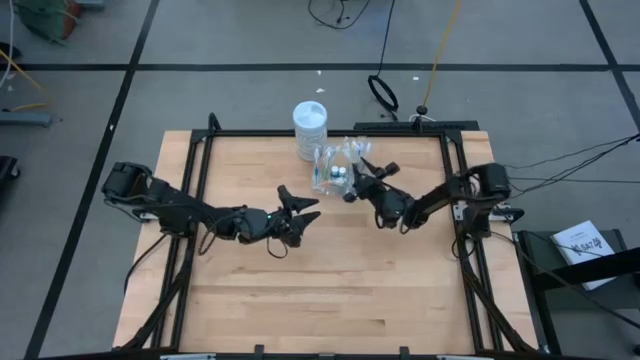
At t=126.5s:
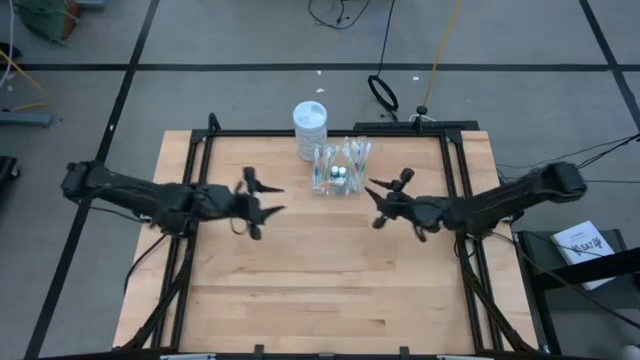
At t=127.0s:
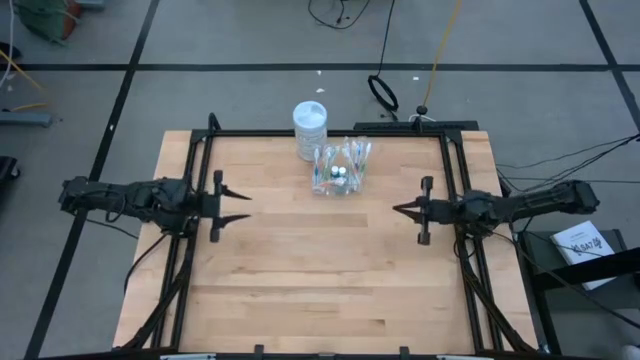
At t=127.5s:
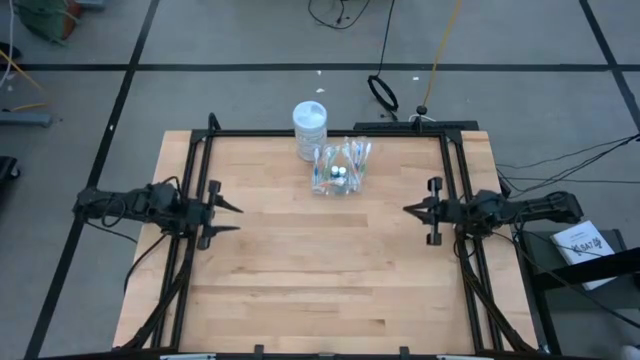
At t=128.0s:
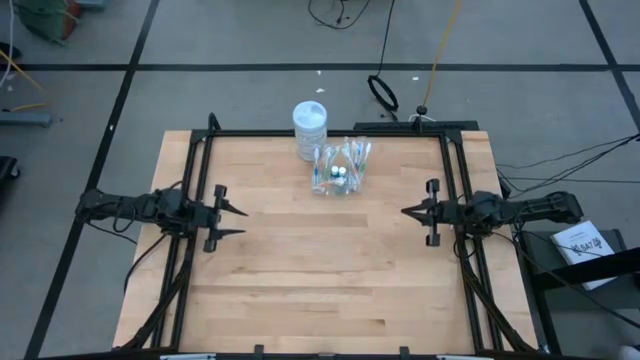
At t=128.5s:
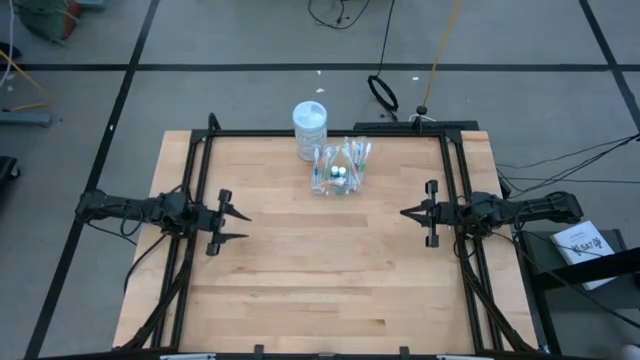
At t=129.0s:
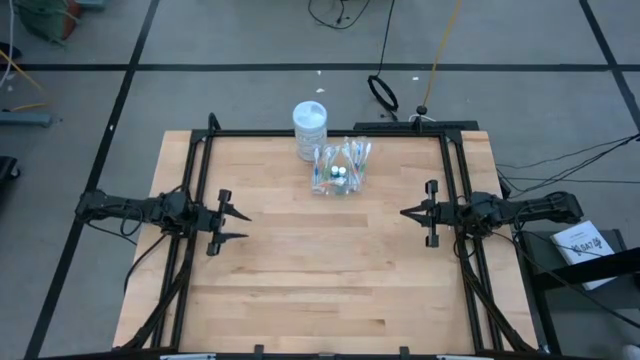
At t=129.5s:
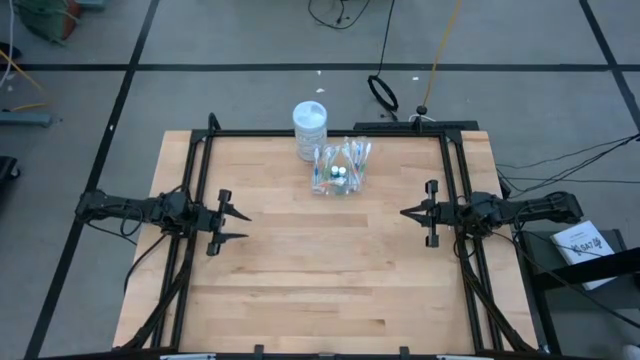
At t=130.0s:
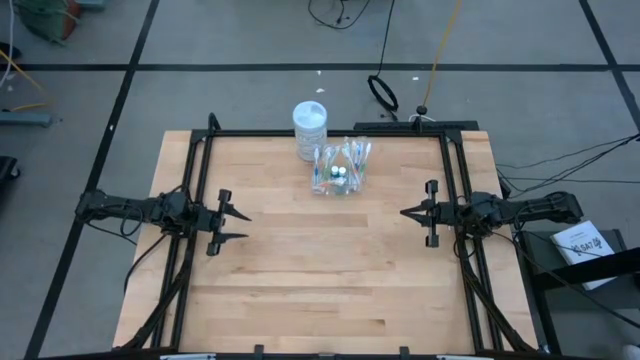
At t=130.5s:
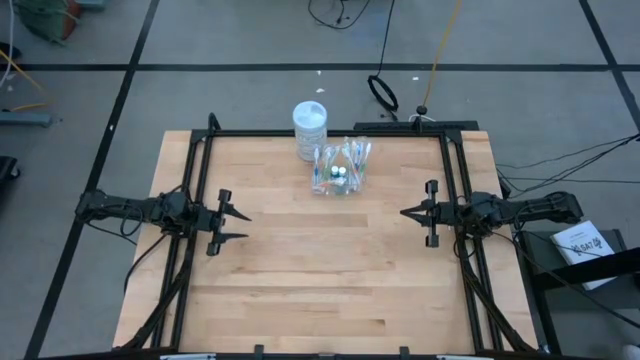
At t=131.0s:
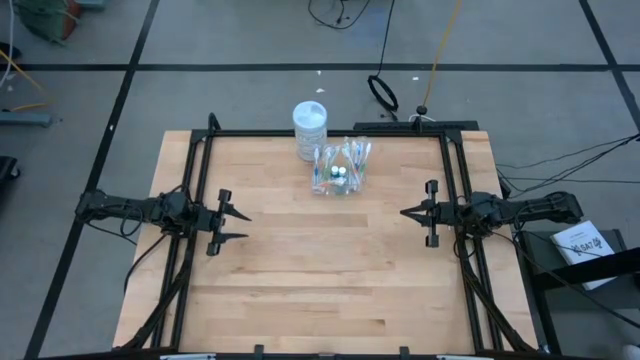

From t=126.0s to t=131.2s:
Task: Pick & Place toothbrushing station
Return to Home Position

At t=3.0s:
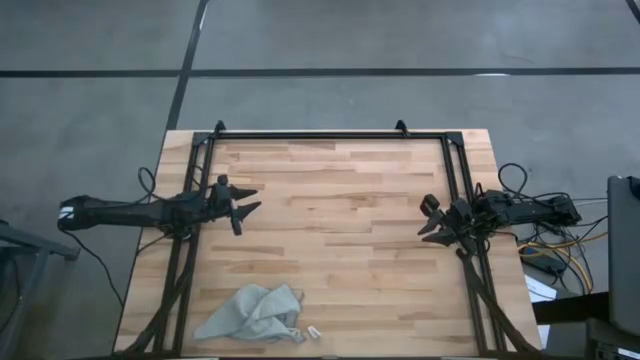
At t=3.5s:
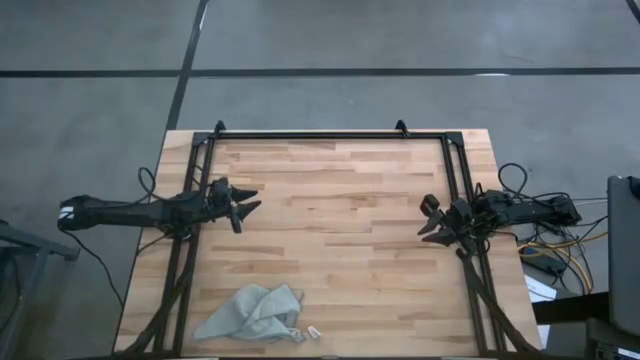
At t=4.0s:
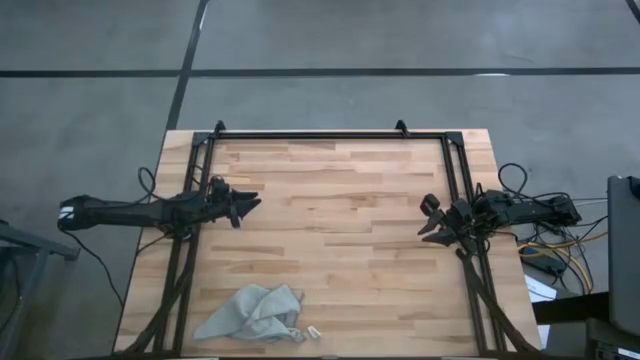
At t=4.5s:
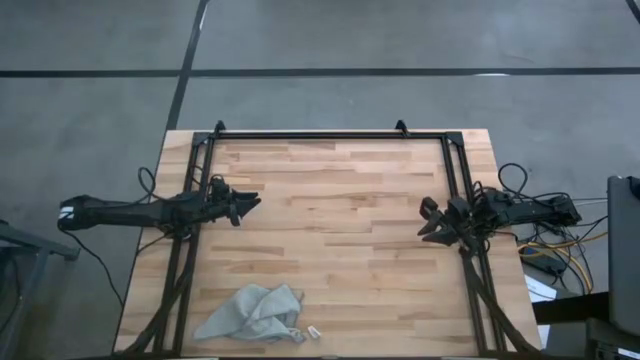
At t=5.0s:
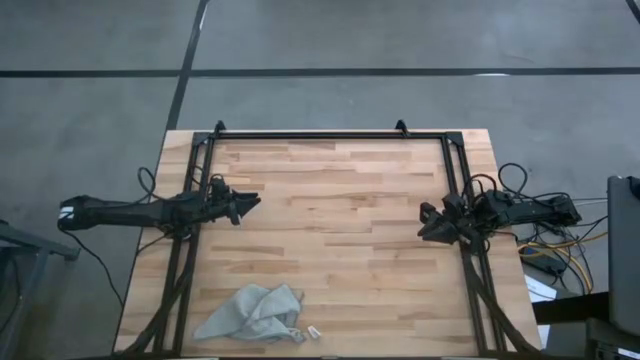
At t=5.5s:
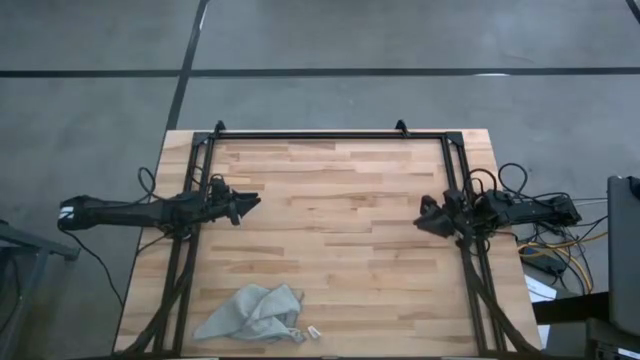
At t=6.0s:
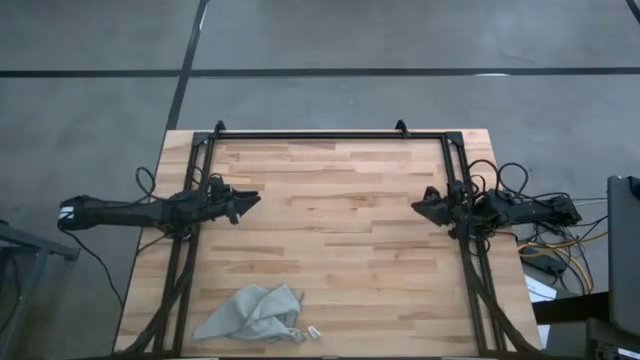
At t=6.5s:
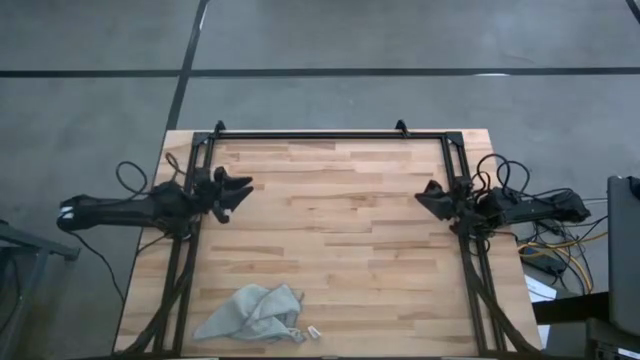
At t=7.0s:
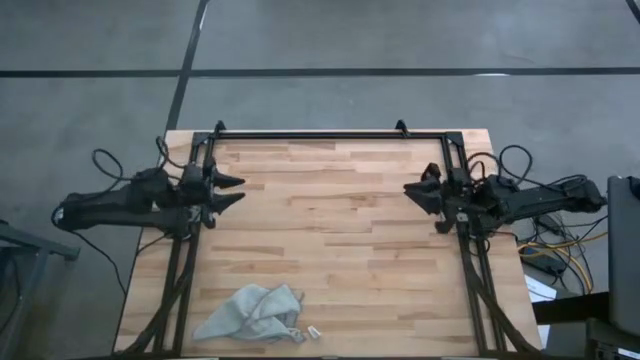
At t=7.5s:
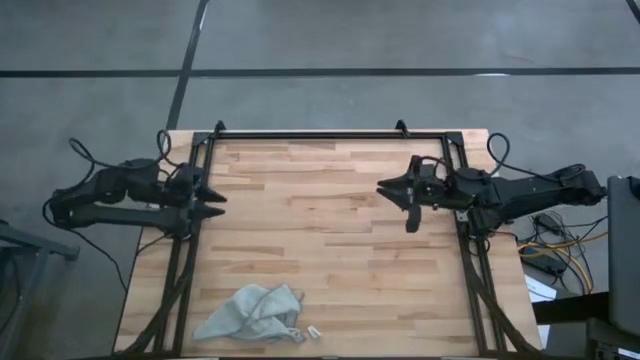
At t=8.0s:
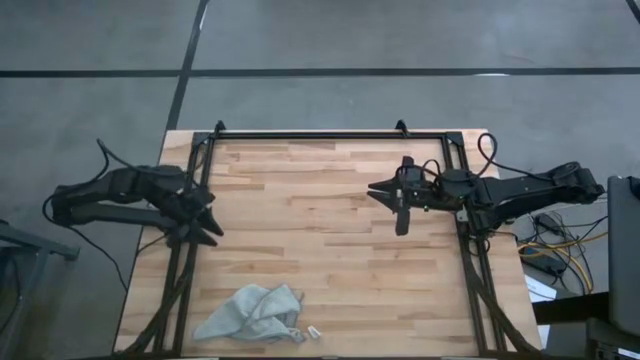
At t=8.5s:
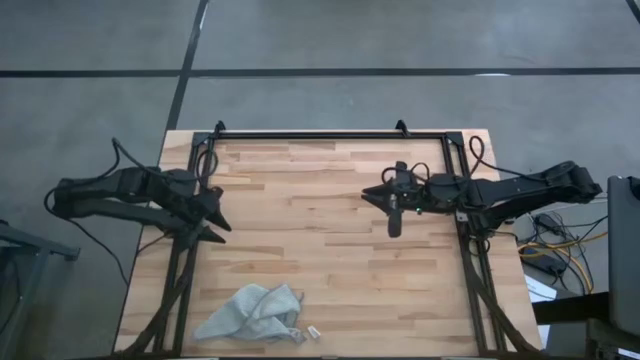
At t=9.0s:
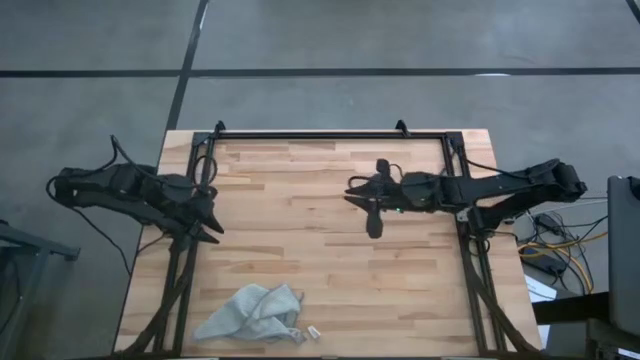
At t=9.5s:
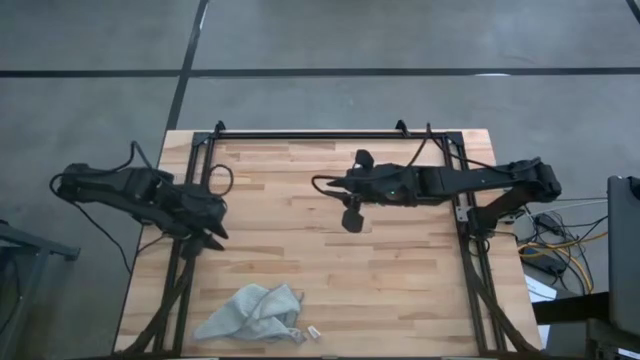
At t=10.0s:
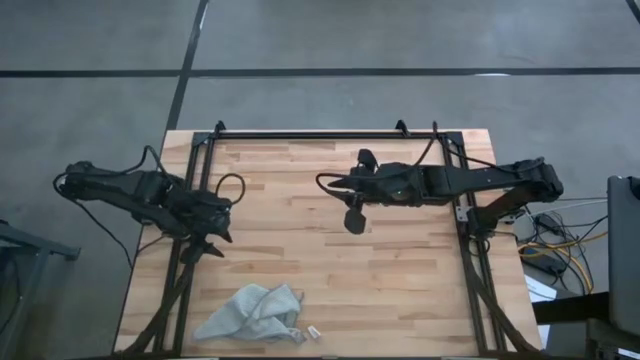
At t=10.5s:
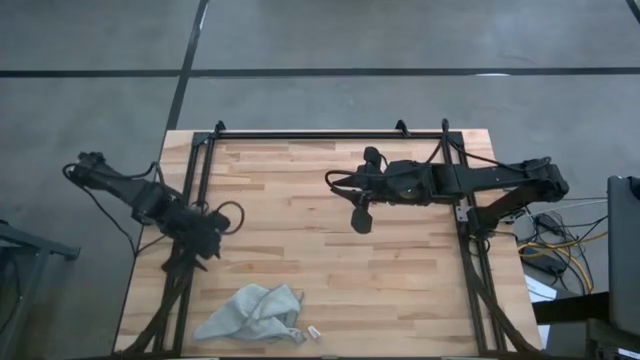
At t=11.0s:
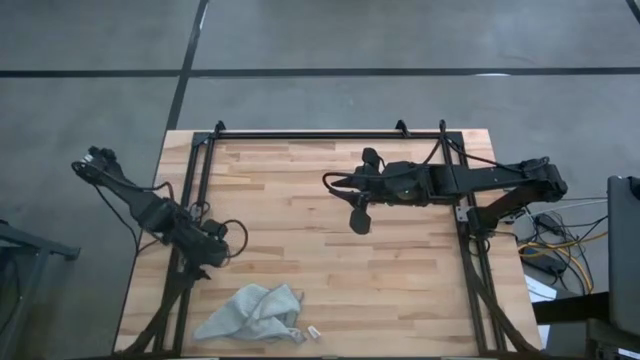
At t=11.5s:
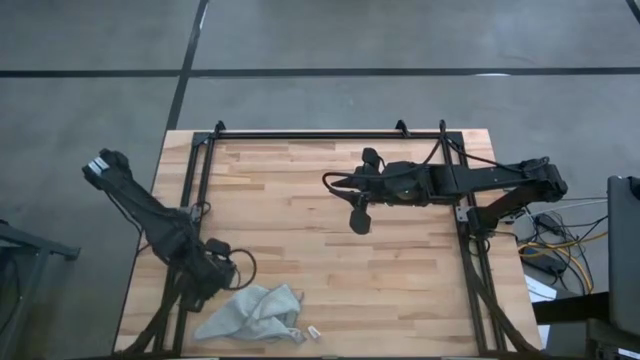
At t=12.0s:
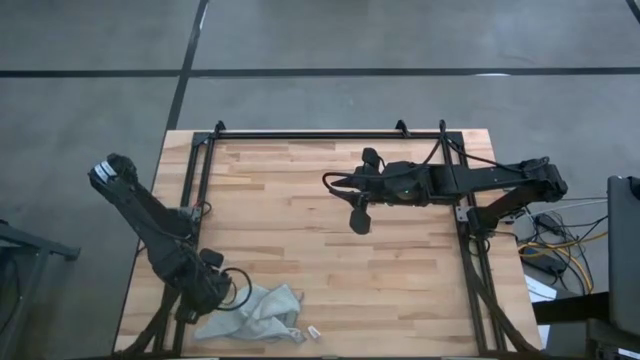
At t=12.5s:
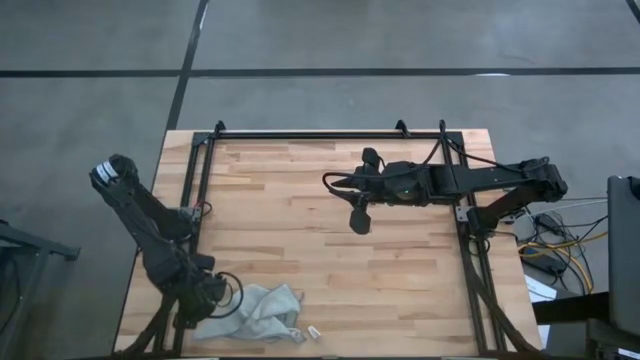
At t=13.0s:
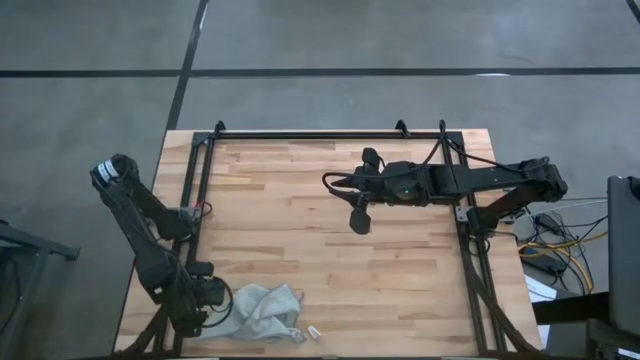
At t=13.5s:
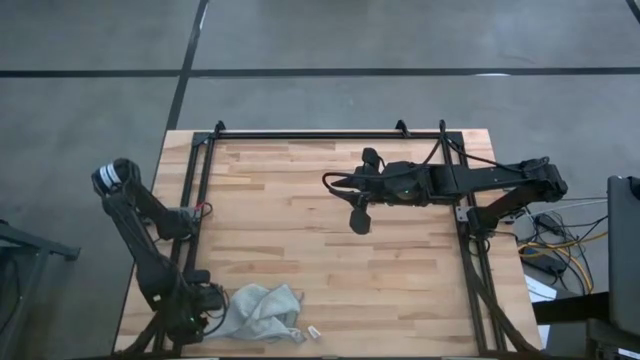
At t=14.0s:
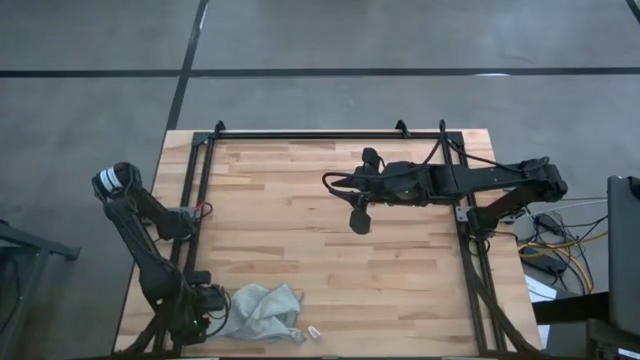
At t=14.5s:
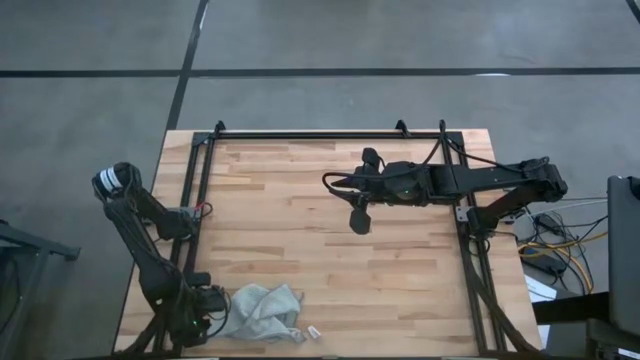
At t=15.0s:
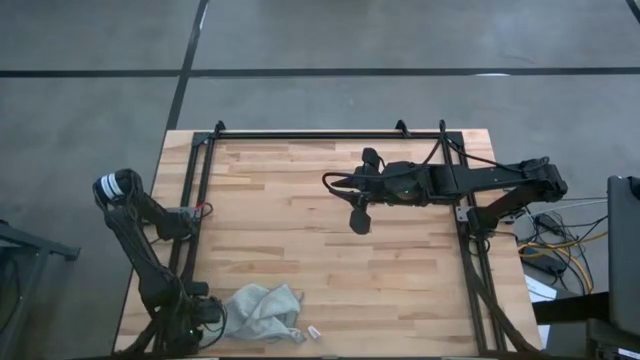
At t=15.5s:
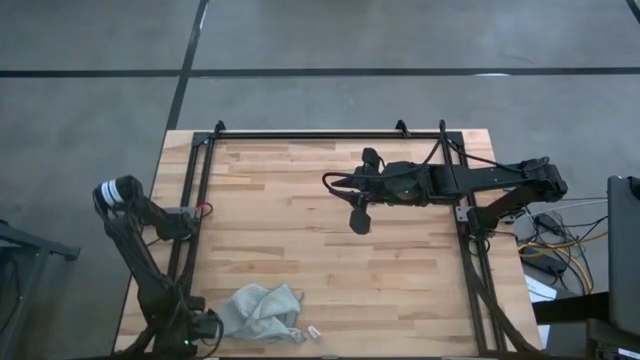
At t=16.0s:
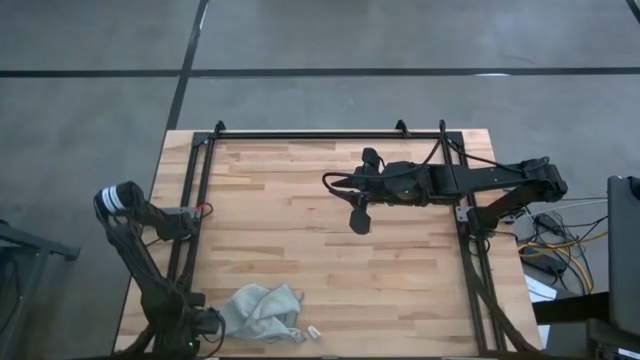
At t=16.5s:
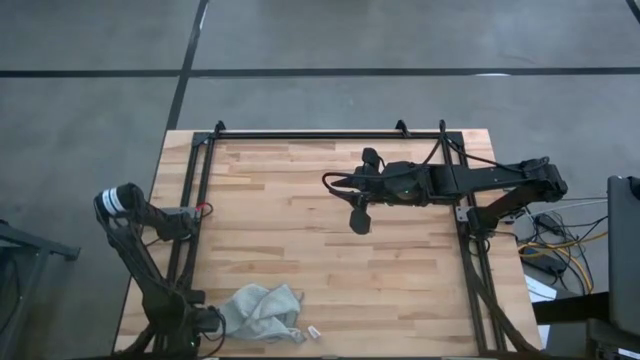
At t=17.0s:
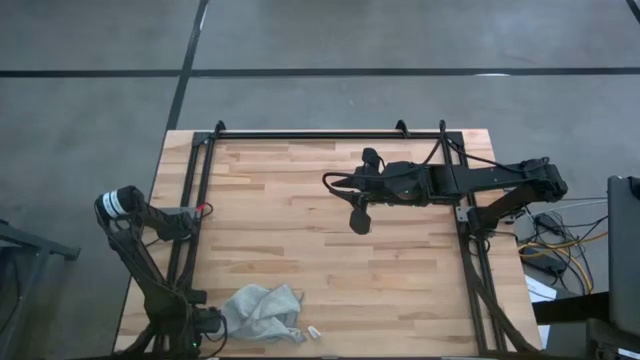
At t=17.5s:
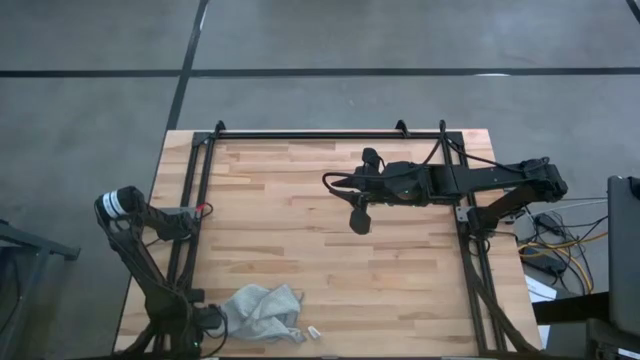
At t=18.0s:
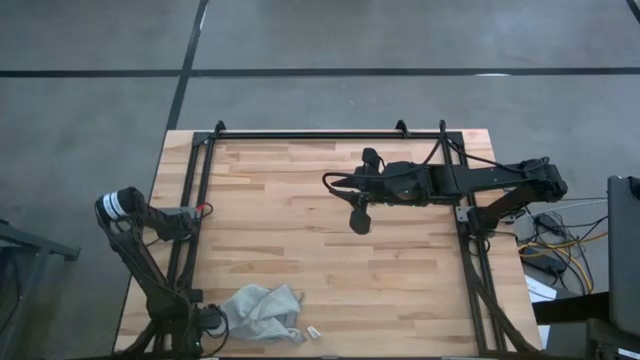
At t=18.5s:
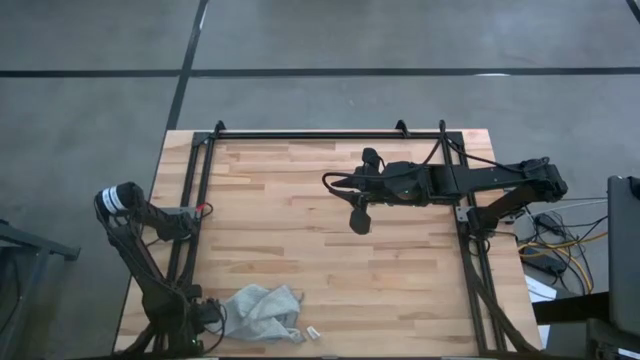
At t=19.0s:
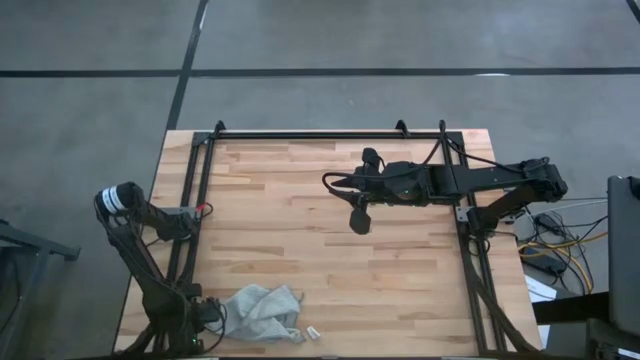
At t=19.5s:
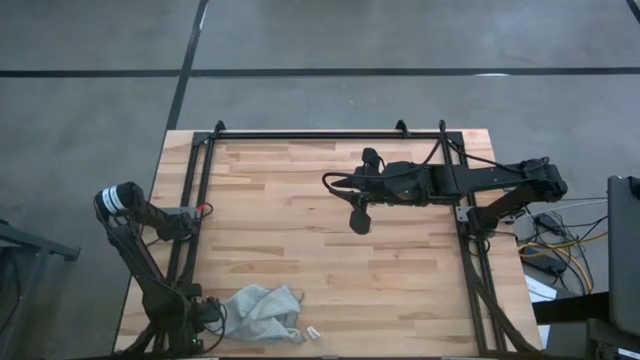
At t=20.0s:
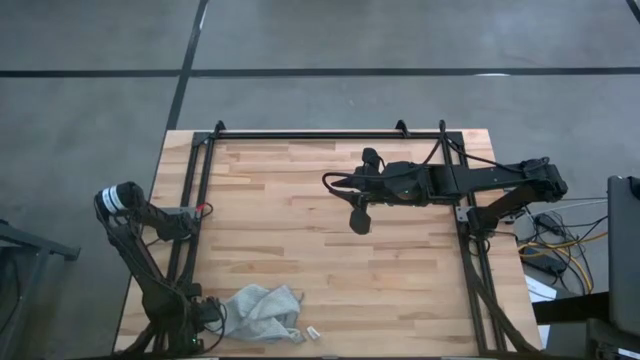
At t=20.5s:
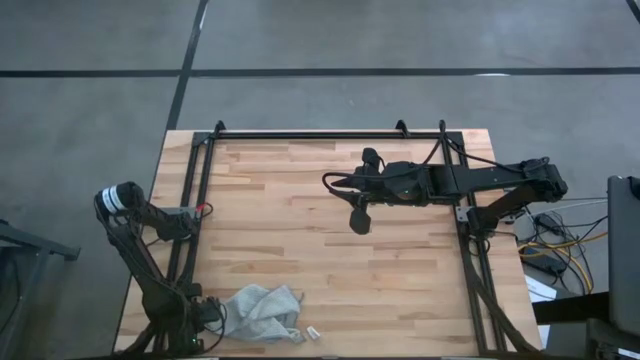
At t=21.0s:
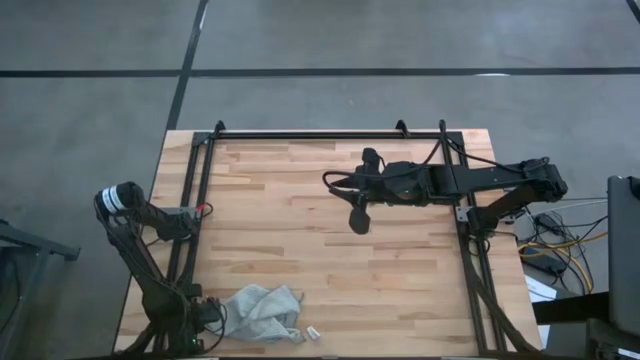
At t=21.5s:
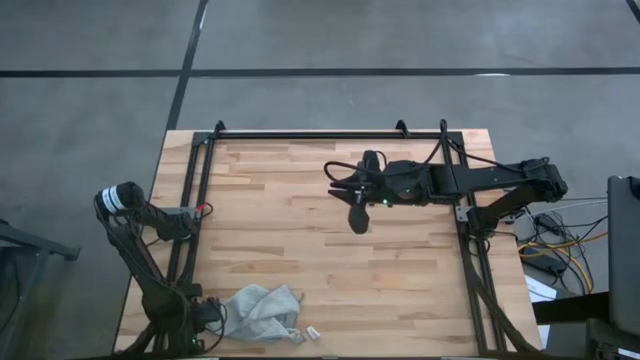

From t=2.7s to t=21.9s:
Task: Fold microfiber towels
Prepare the microfiber cloth on the table
